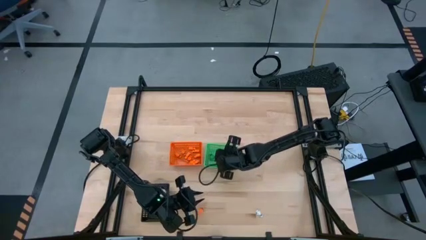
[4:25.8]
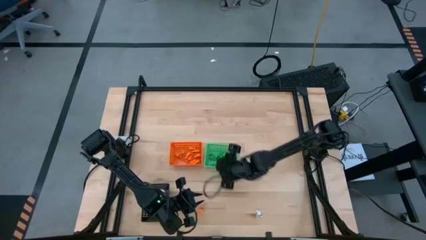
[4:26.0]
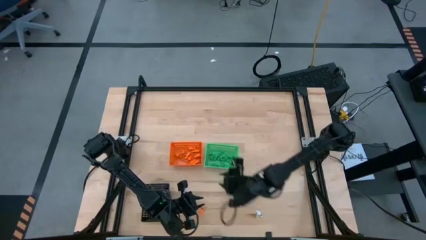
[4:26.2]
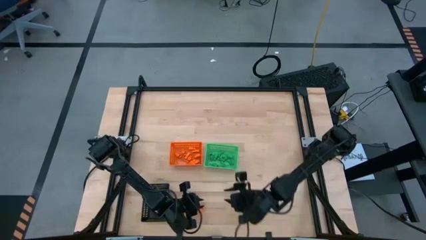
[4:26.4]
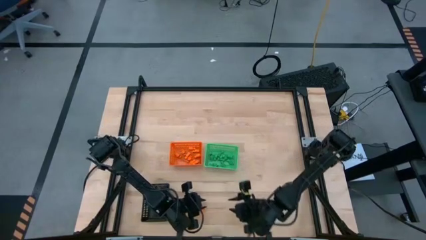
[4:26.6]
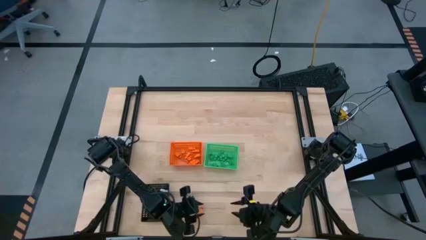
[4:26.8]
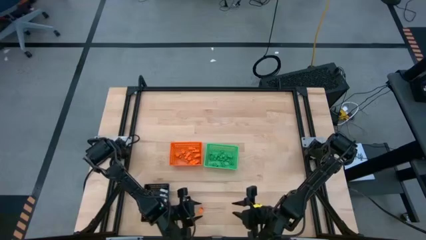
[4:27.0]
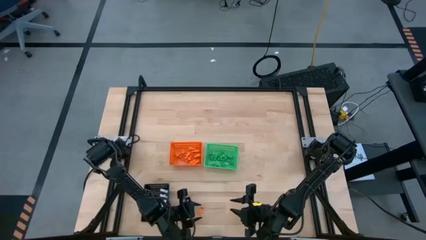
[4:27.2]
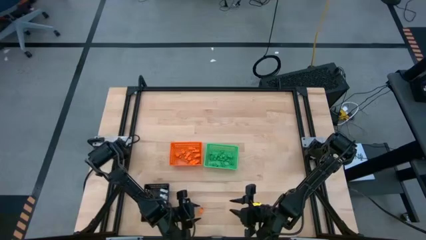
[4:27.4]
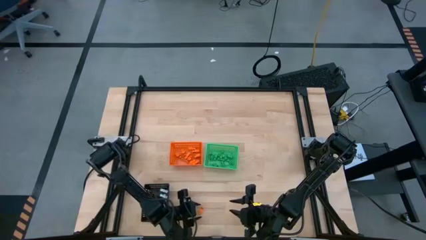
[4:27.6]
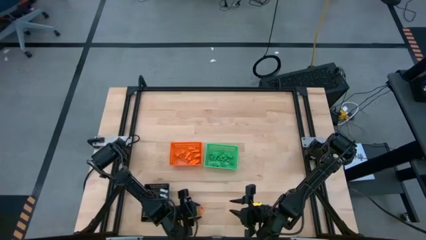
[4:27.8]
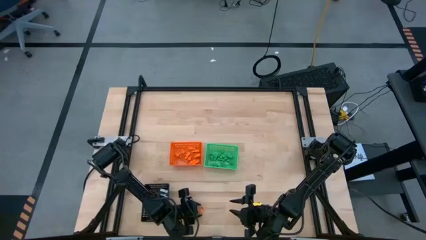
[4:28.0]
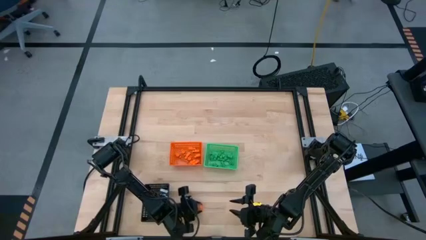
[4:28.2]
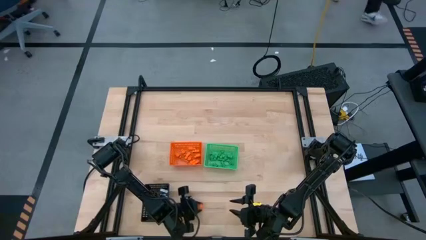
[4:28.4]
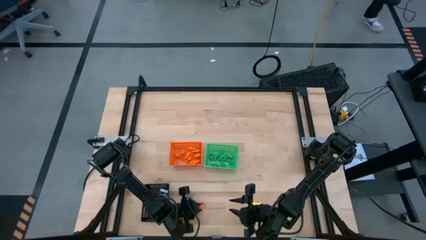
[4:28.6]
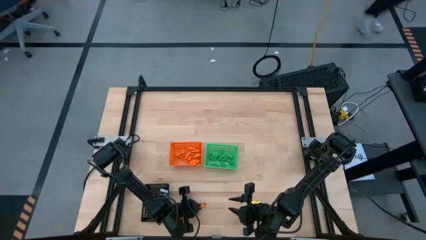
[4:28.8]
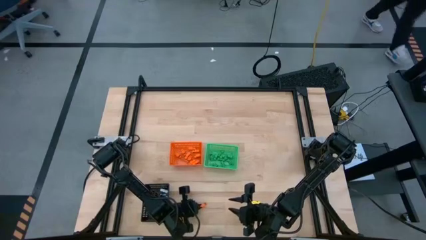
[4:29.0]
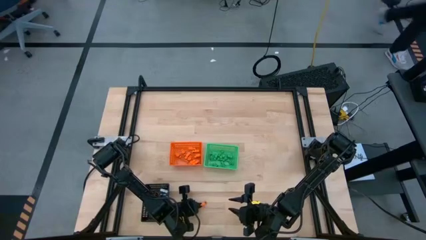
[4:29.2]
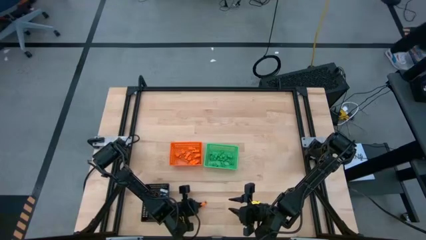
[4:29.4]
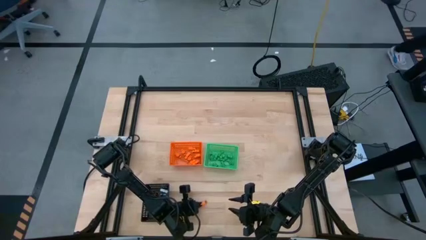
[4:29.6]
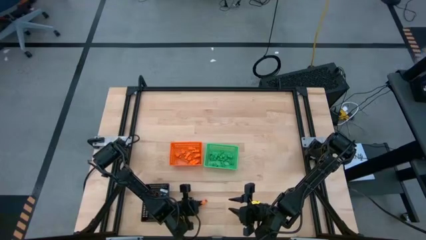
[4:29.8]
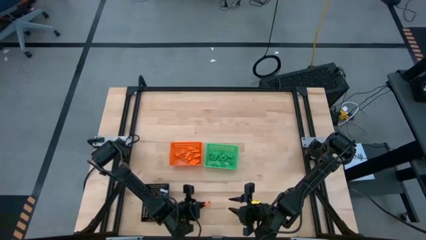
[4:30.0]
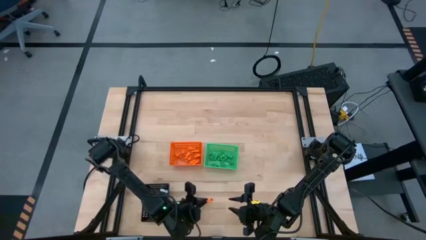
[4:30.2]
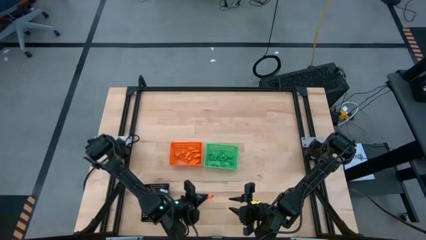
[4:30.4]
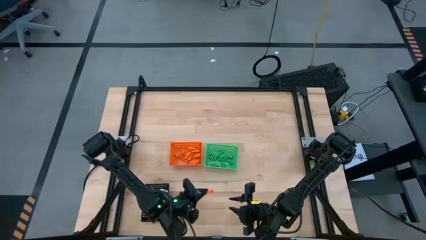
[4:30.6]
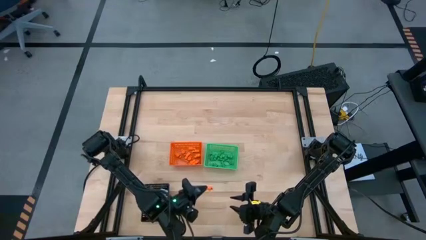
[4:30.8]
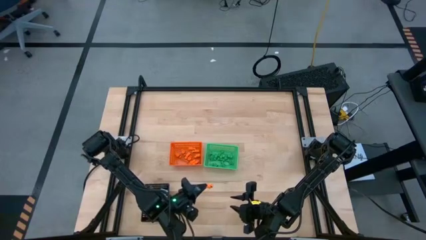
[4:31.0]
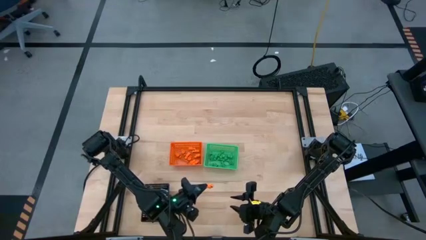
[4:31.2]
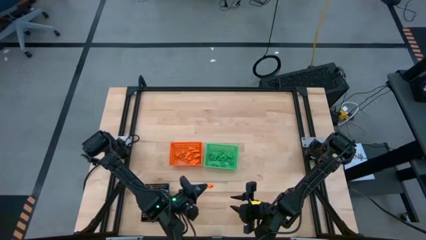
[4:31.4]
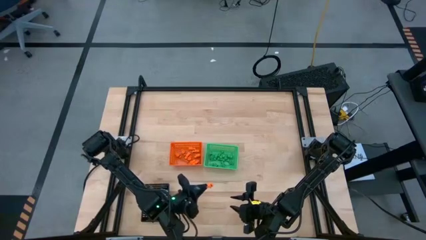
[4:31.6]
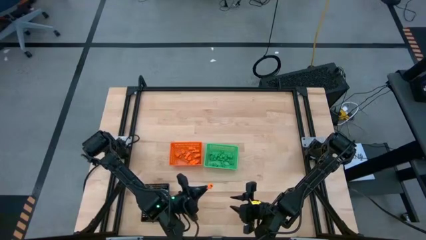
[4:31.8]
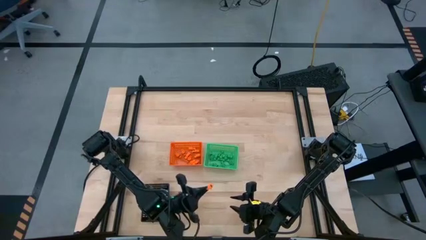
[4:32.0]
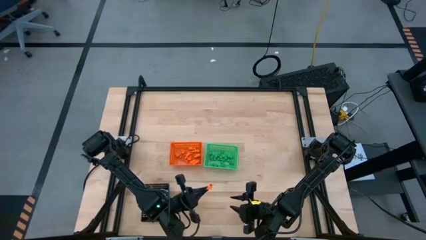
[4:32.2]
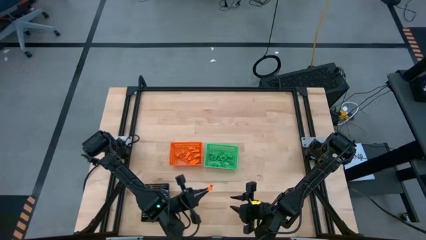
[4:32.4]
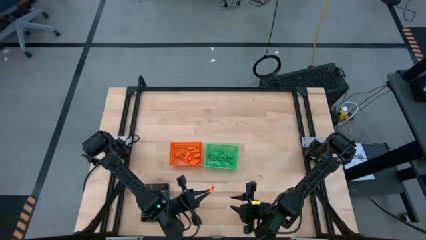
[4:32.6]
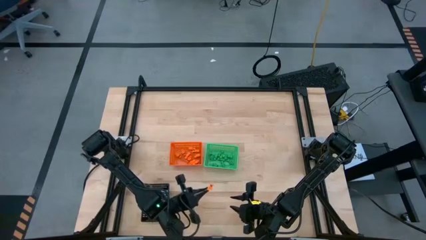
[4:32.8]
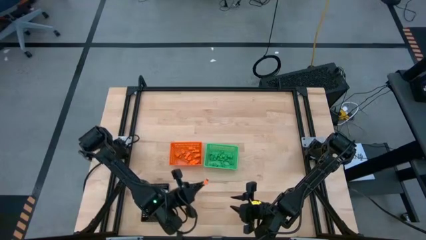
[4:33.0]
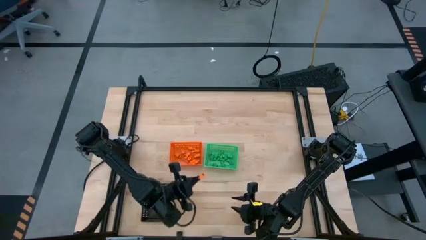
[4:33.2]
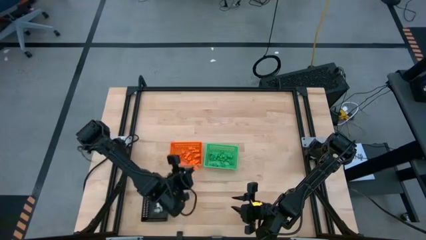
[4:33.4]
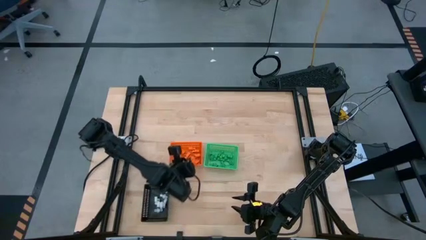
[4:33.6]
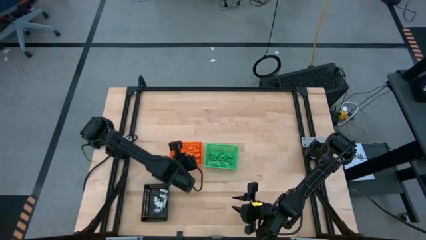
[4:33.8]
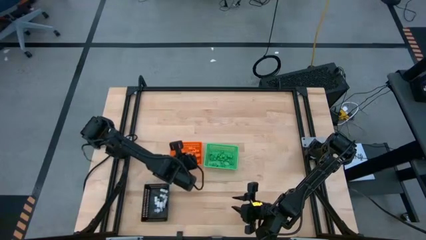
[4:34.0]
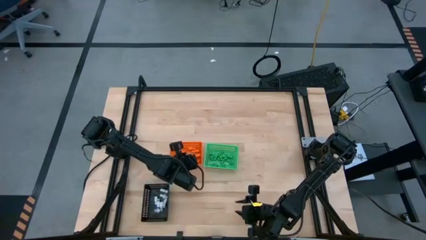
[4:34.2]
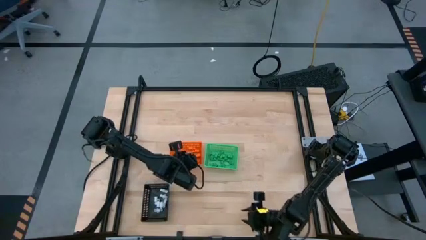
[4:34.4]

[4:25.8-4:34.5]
Task: Sort Halloween decoration
Put the orange skeleton toy into the orange bin

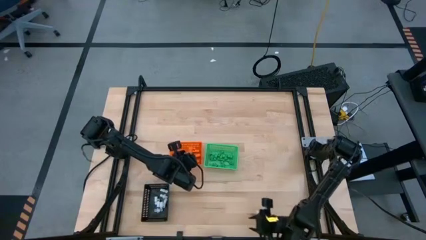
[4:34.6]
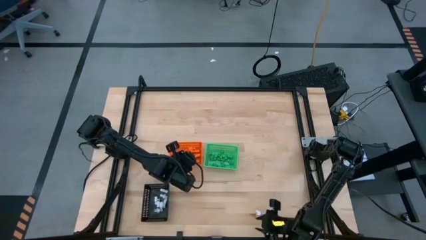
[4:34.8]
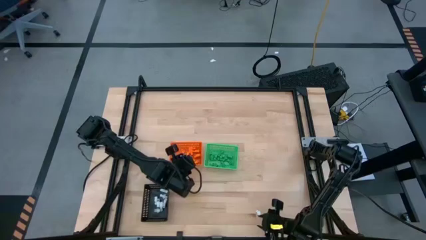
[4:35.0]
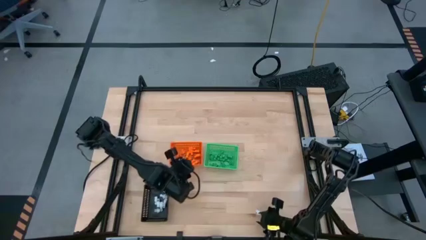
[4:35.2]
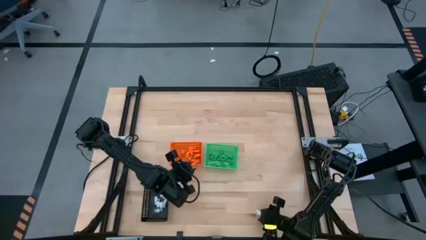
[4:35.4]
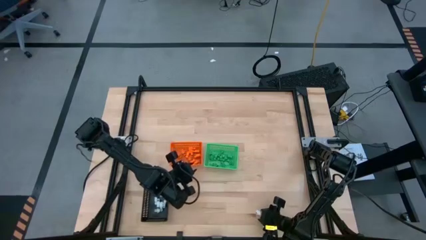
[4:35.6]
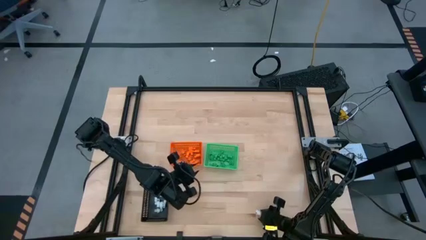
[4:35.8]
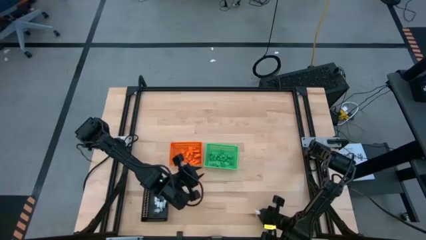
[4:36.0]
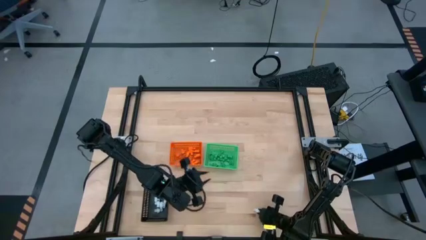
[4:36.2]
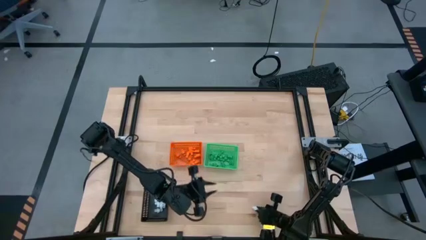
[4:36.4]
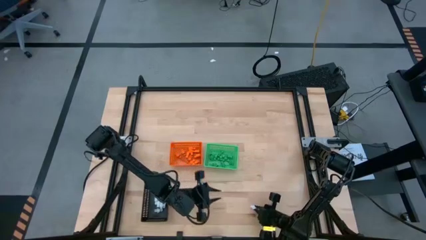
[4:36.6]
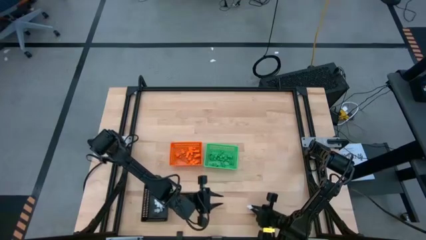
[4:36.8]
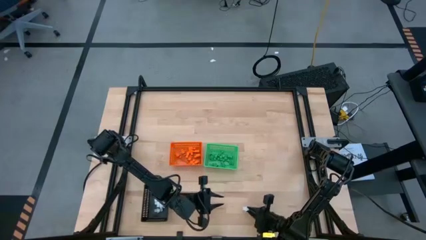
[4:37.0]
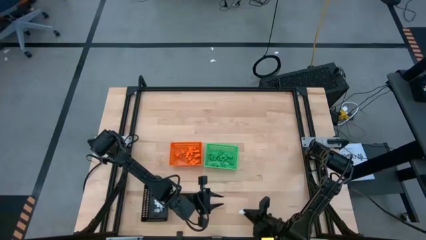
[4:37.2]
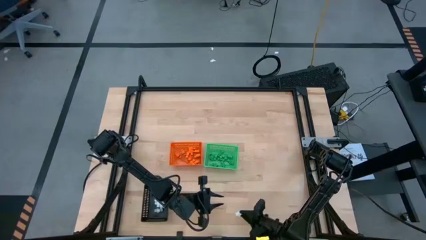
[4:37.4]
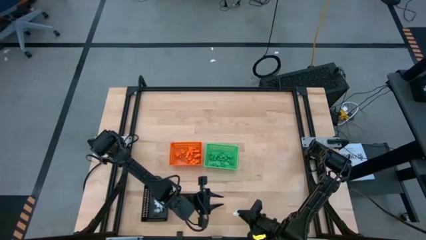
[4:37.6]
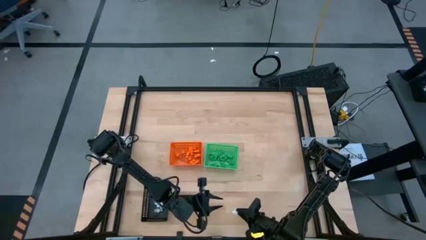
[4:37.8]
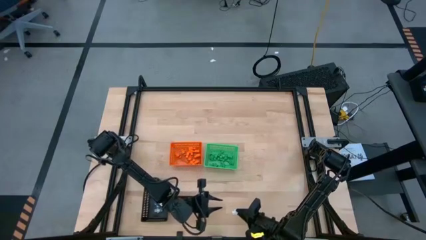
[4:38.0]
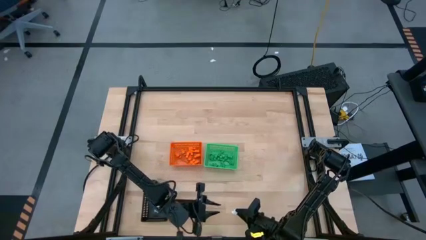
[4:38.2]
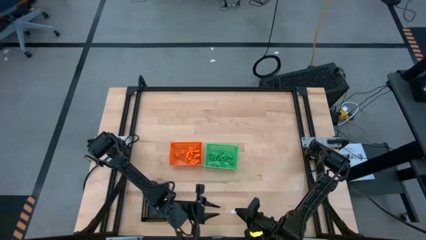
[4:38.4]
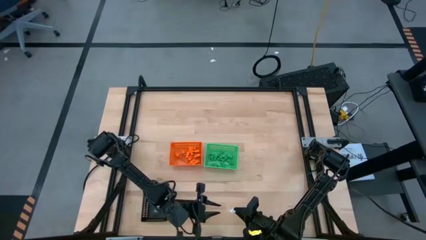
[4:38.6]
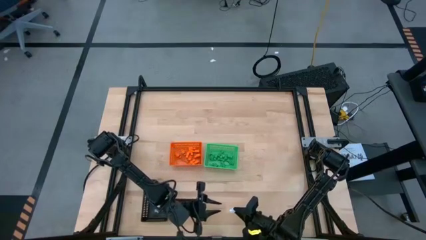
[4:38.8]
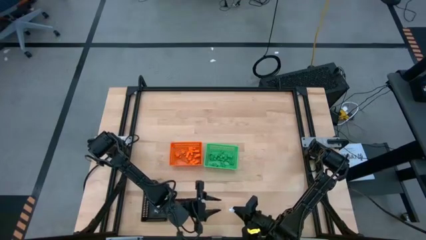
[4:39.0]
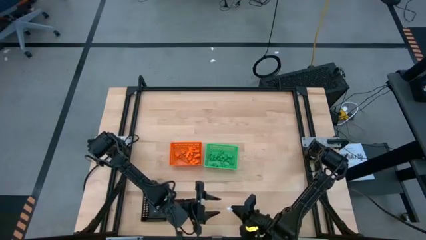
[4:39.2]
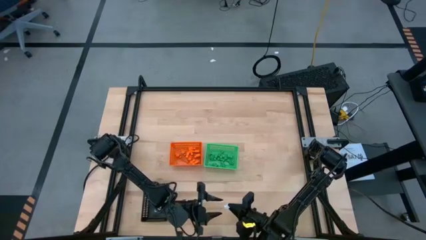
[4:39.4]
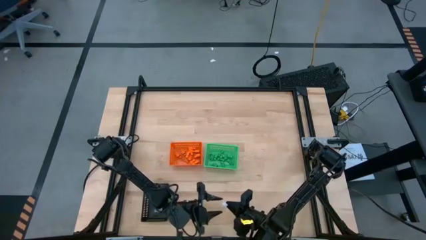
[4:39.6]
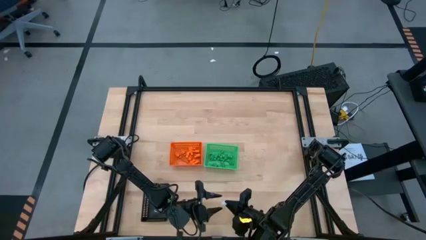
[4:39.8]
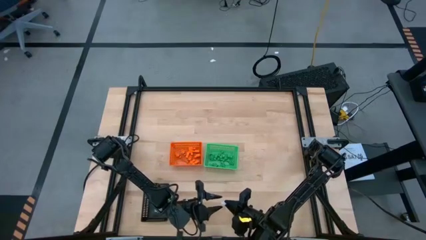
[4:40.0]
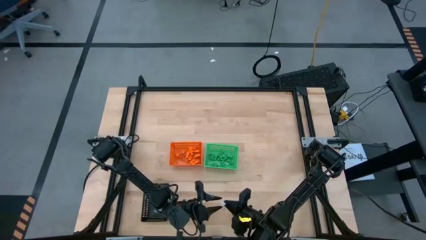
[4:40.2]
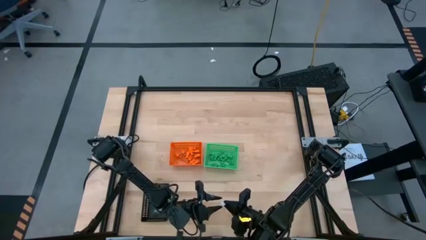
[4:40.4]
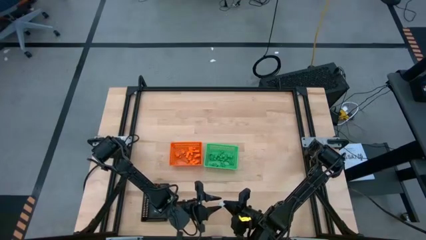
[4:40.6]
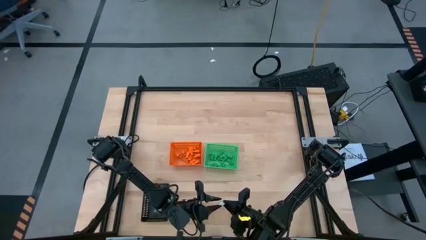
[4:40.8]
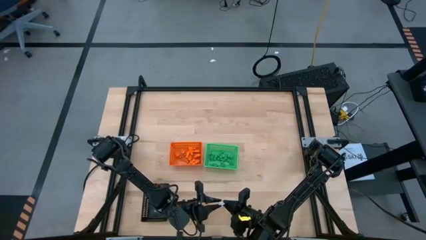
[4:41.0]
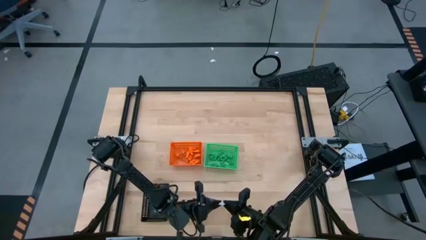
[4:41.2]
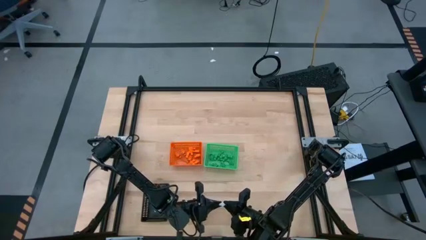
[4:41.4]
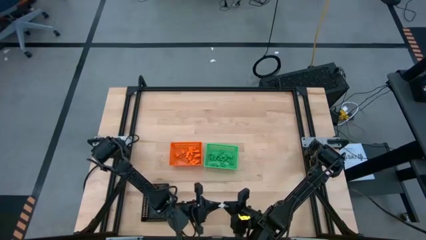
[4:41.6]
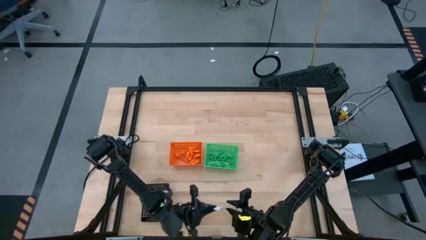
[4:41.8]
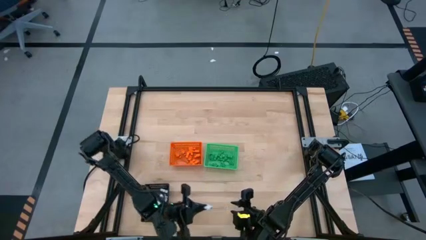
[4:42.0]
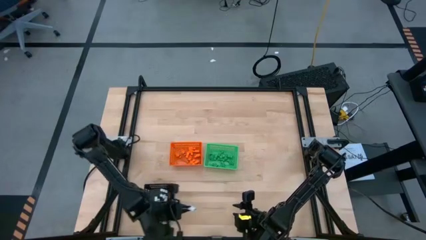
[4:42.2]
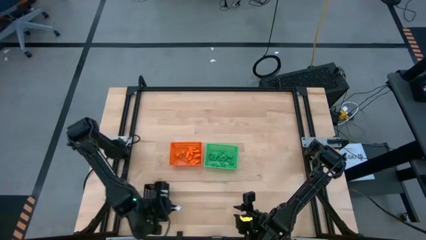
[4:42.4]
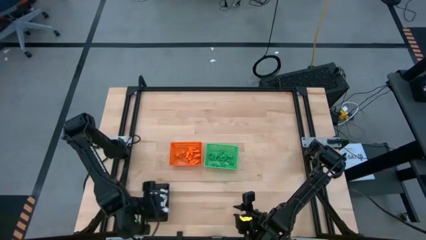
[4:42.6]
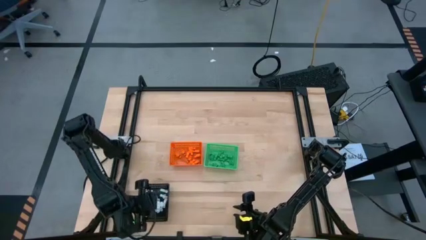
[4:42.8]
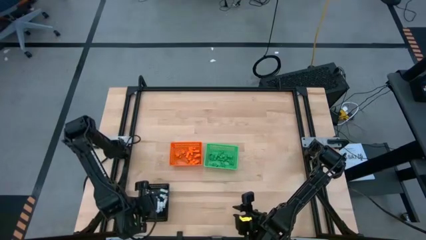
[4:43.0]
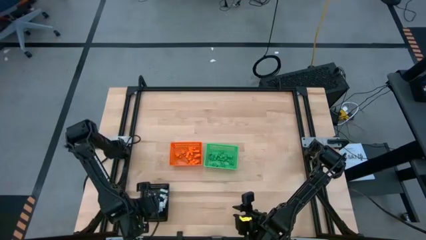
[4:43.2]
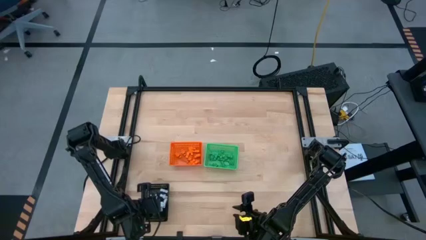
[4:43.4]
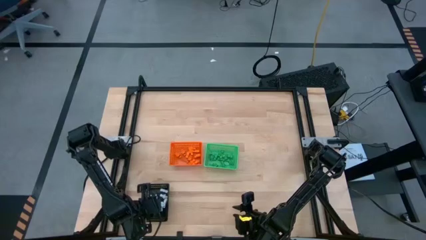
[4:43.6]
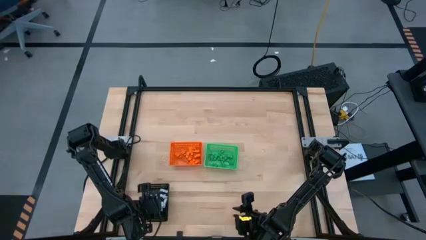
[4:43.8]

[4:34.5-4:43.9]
Put the white skeleton toy into the black bin
